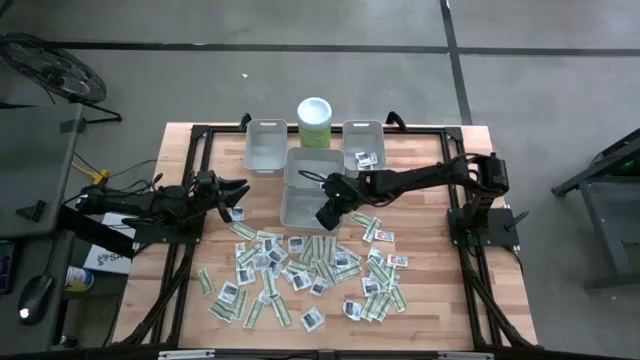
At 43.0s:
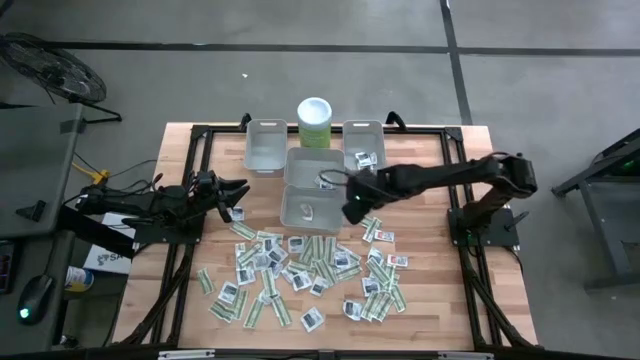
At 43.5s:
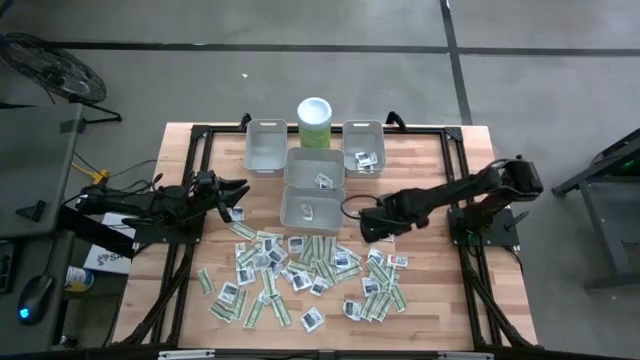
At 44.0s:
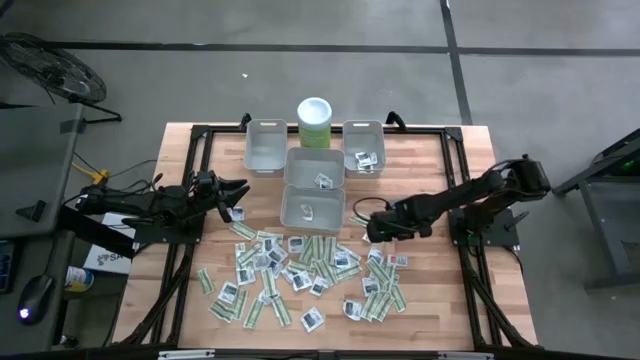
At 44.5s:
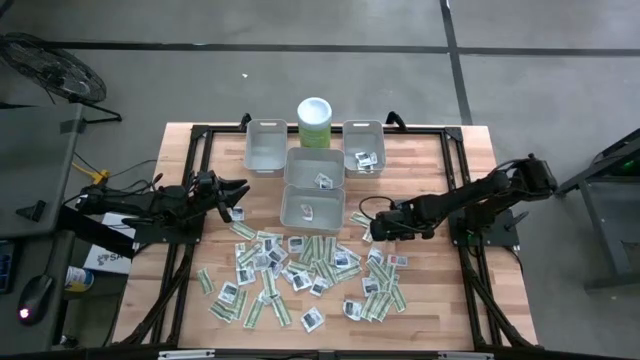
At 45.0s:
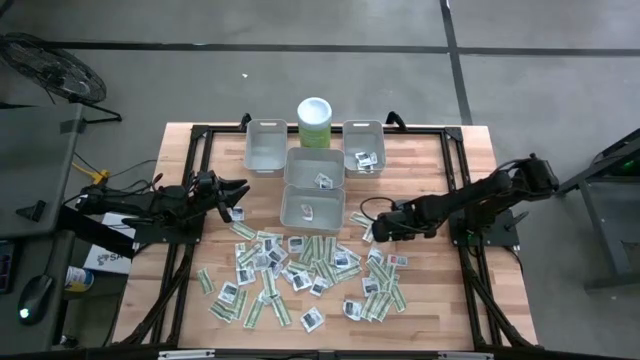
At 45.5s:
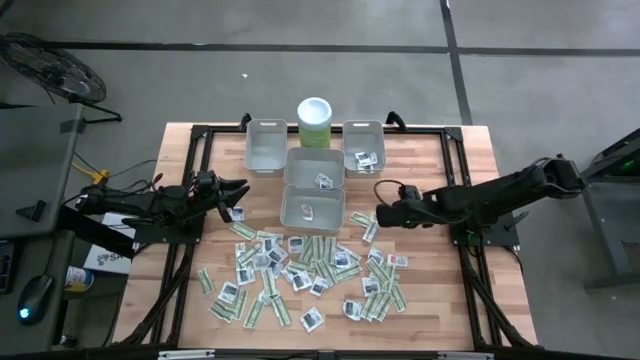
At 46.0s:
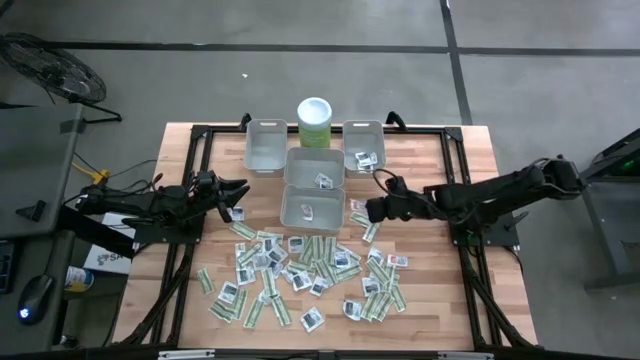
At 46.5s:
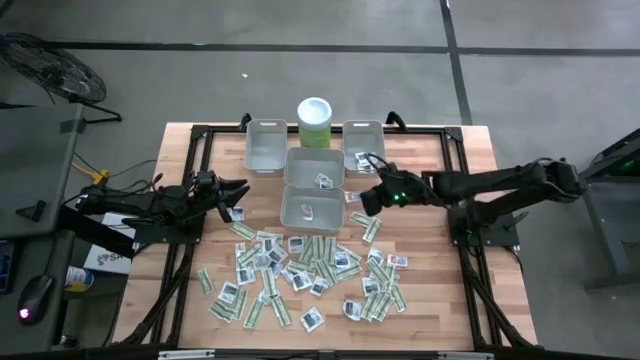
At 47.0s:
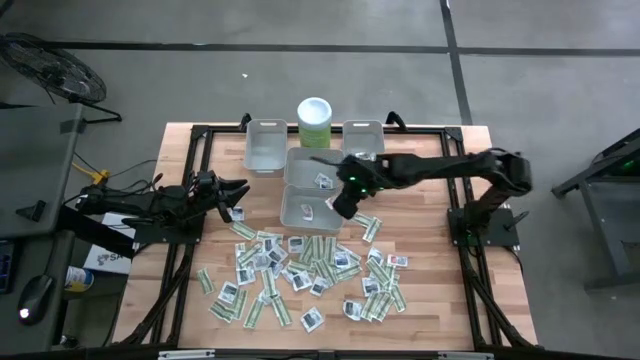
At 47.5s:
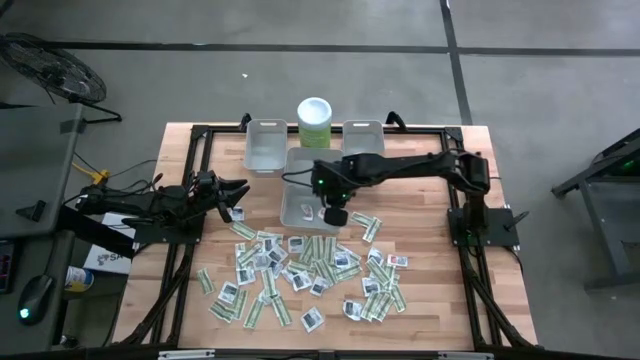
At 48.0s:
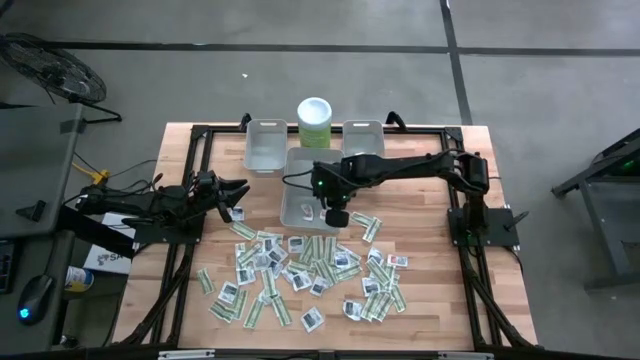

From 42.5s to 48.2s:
Task: Pick & Place First Aid Supplies
Put the ointment pack into the bottom center bin

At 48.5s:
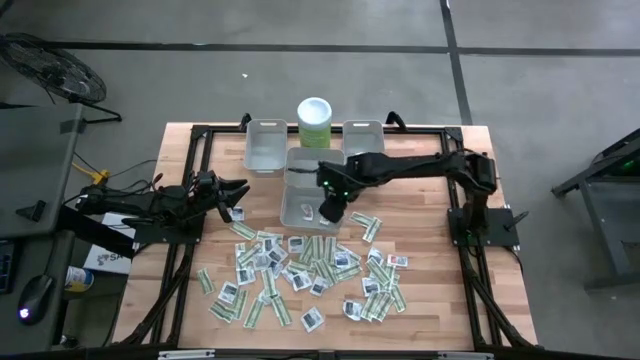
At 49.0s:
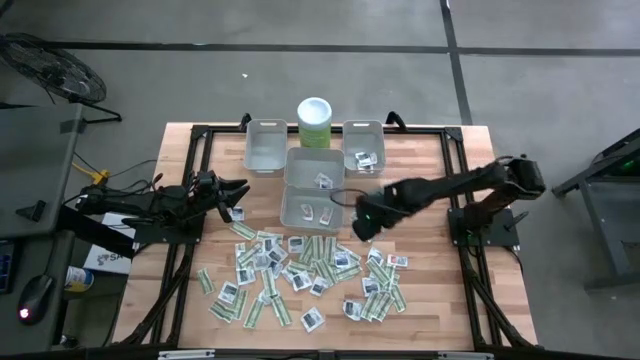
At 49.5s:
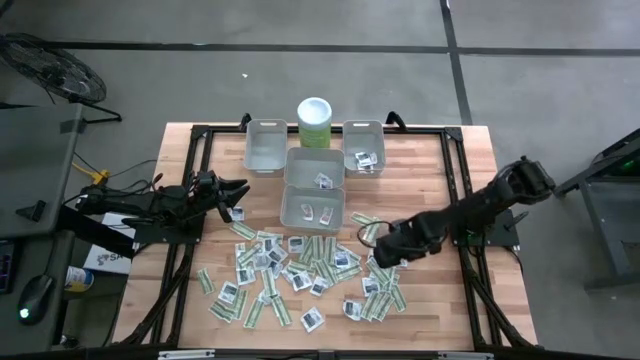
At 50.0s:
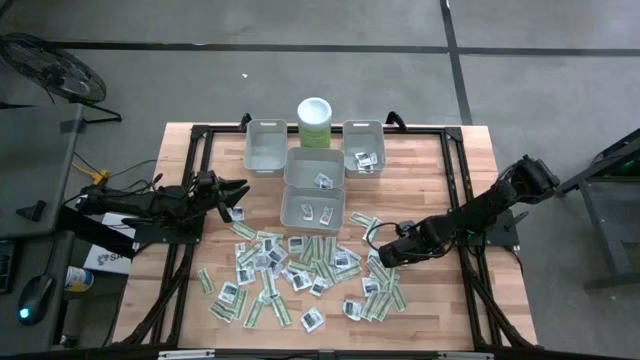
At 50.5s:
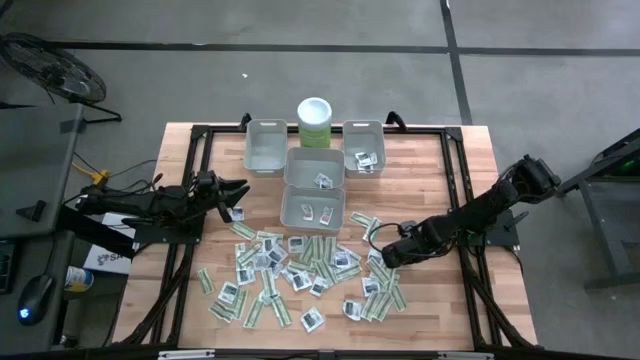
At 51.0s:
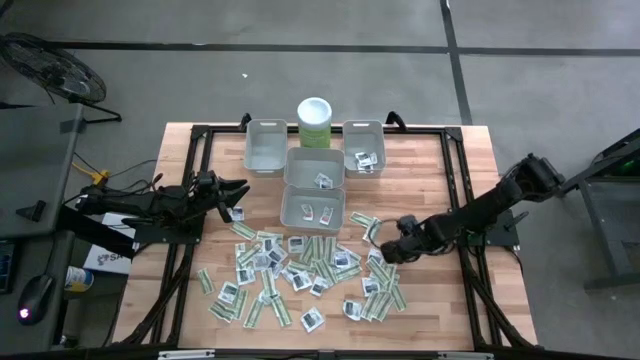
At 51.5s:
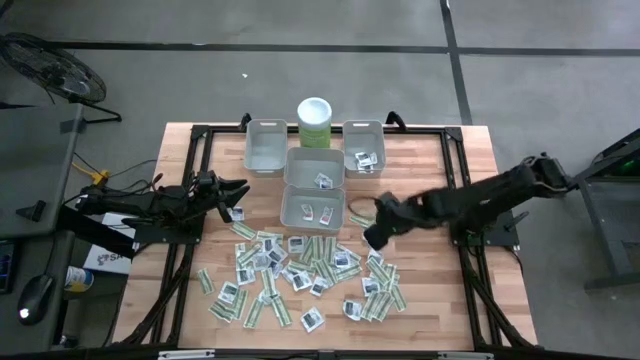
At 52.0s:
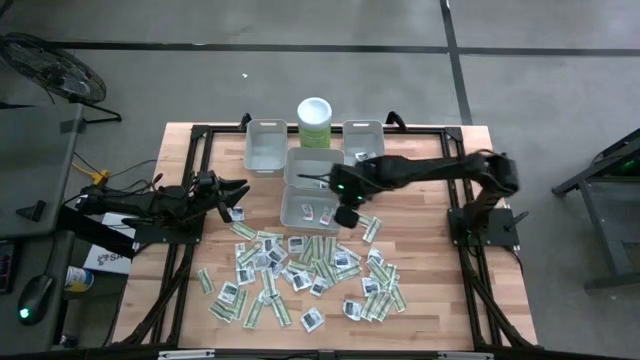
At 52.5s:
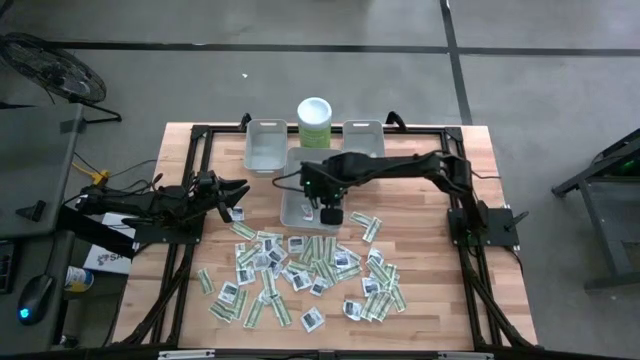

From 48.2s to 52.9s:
Put the top right ointment pack into the bottom center bin

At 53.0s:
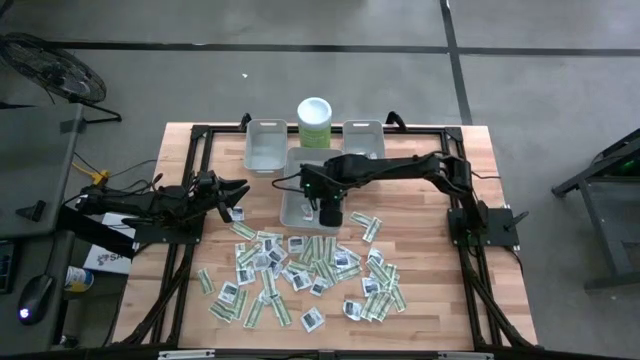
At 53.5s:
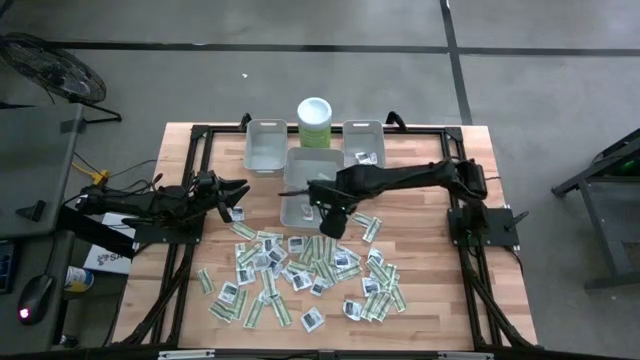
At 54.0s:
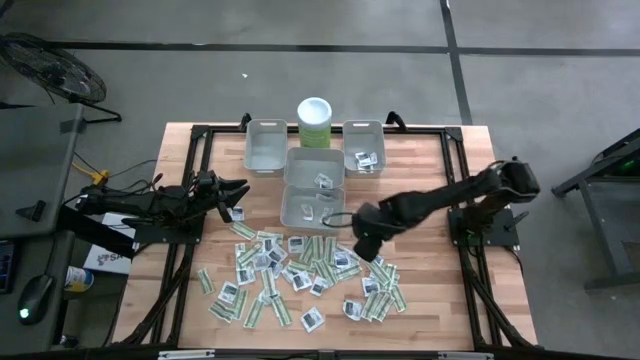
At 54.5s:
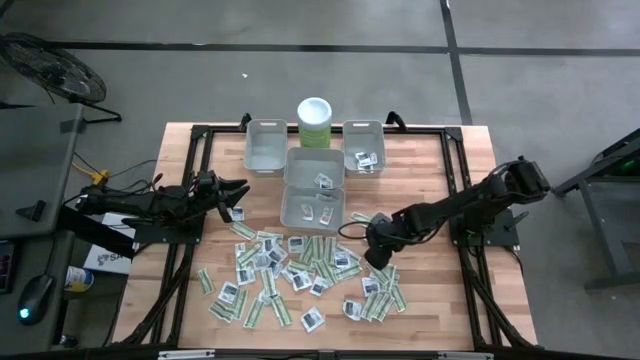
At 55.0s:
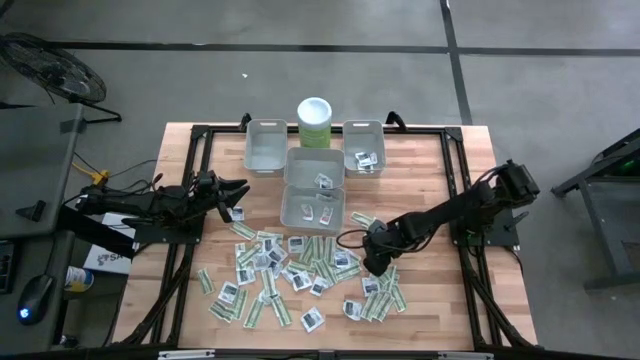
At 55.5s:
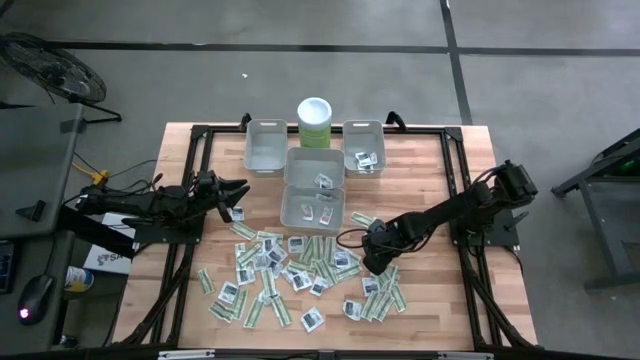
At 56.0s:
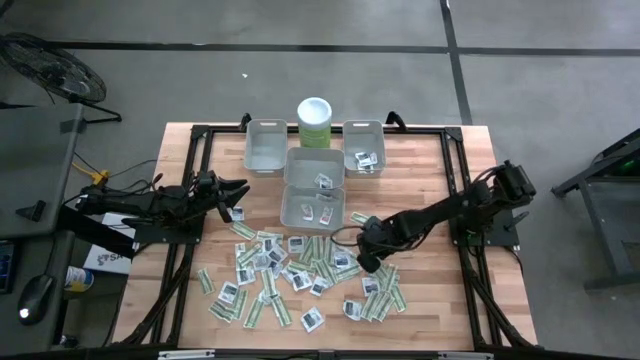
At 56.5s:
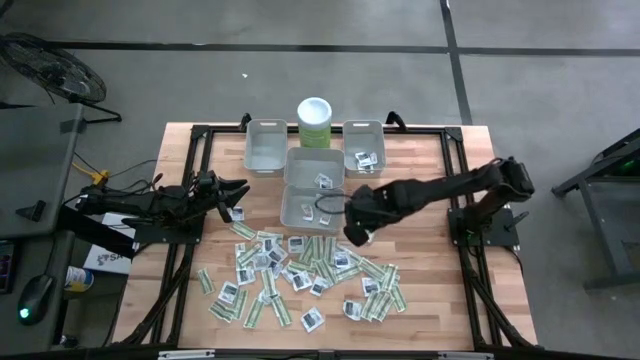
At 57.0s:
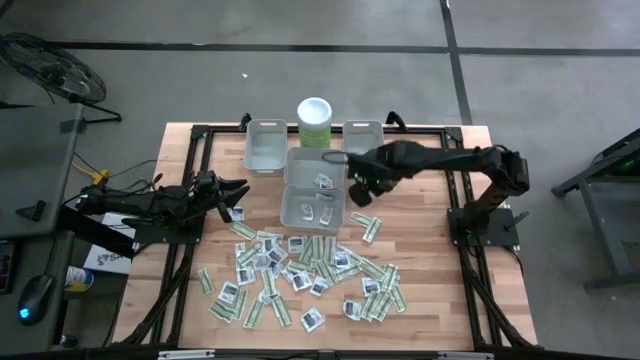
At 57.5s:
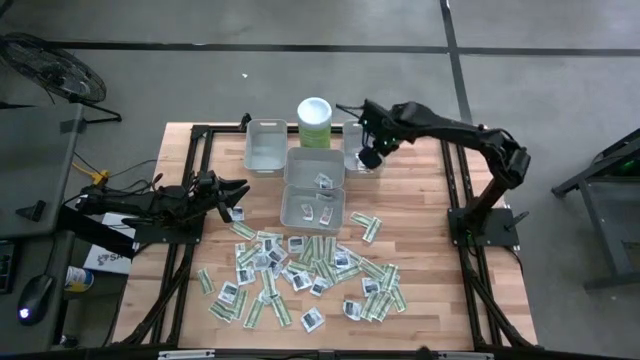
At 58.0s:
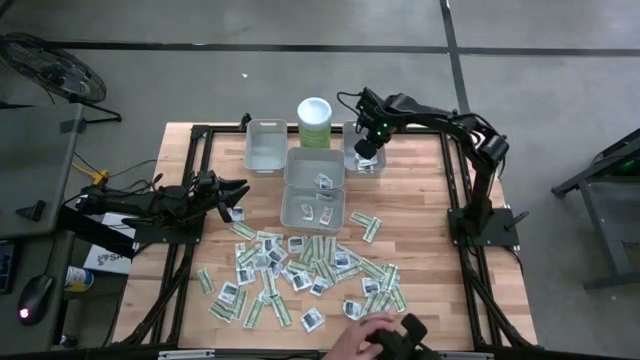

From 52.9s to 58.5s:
Put the towelette pack into the right bin

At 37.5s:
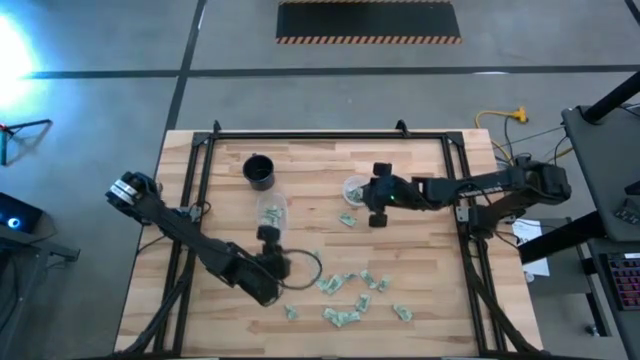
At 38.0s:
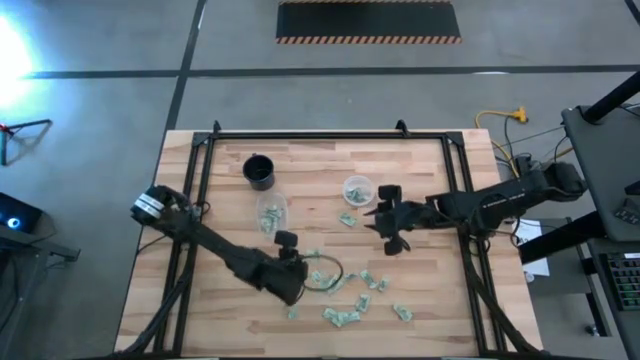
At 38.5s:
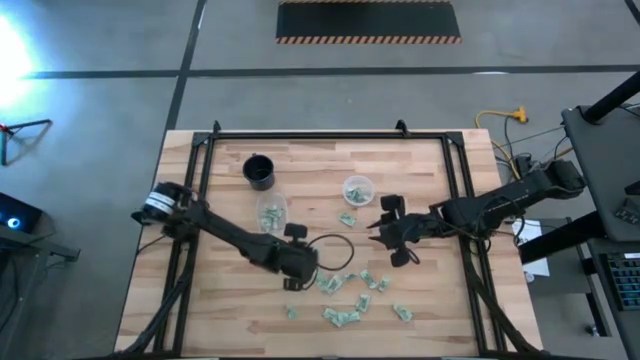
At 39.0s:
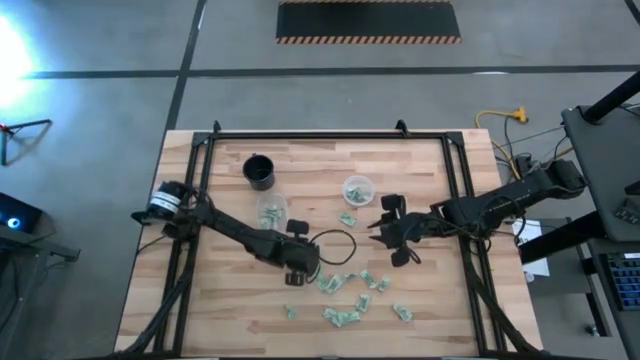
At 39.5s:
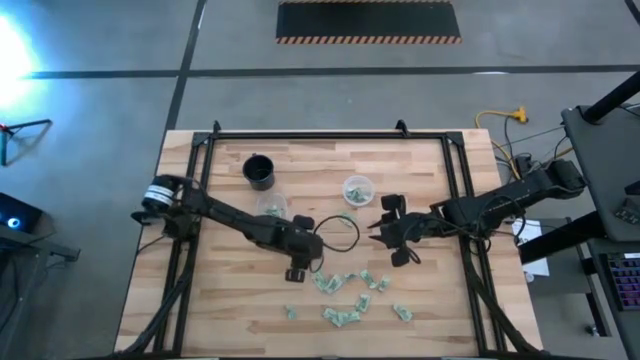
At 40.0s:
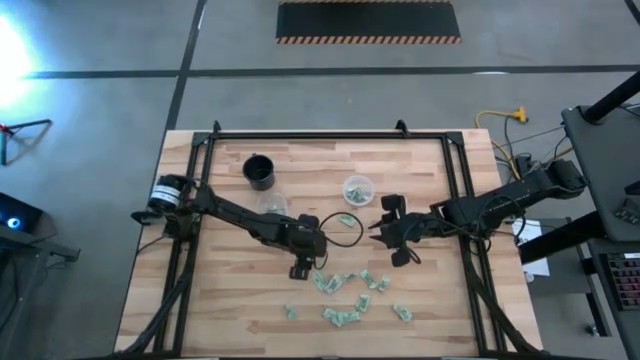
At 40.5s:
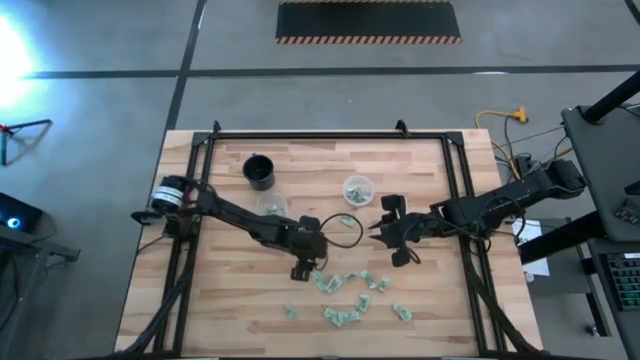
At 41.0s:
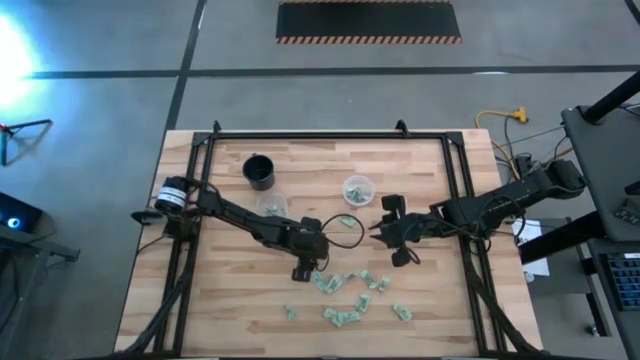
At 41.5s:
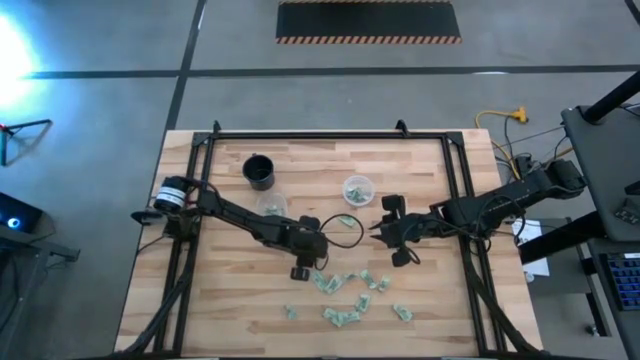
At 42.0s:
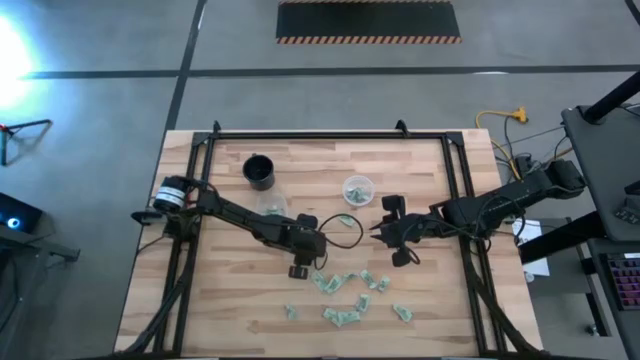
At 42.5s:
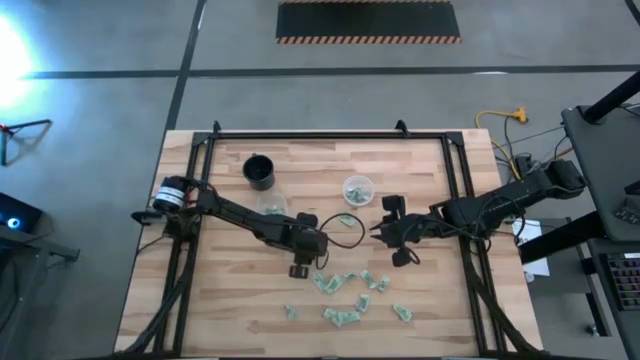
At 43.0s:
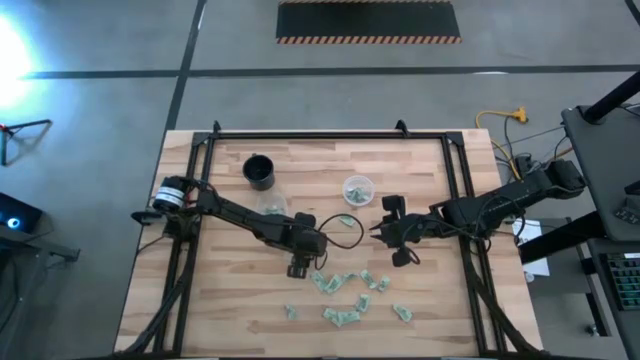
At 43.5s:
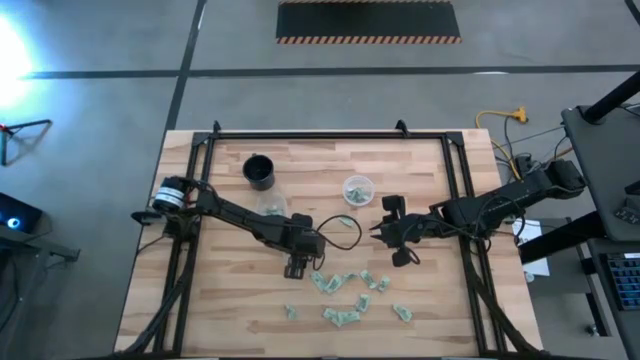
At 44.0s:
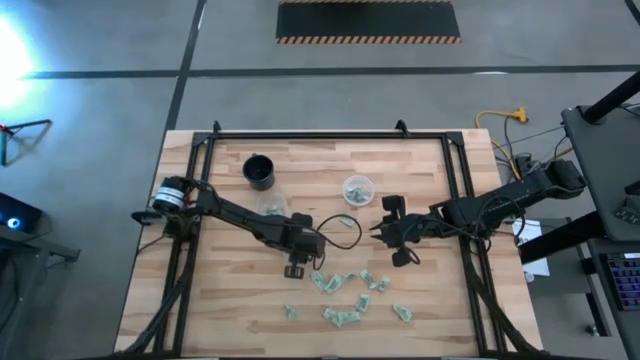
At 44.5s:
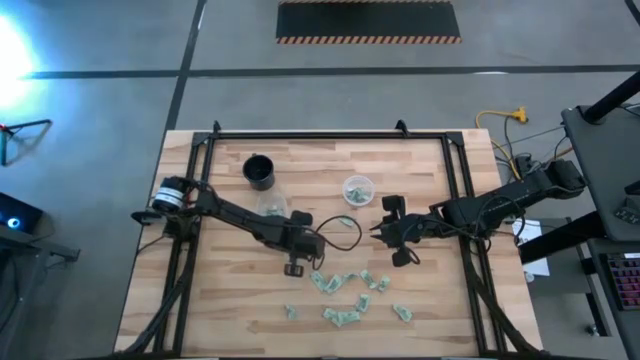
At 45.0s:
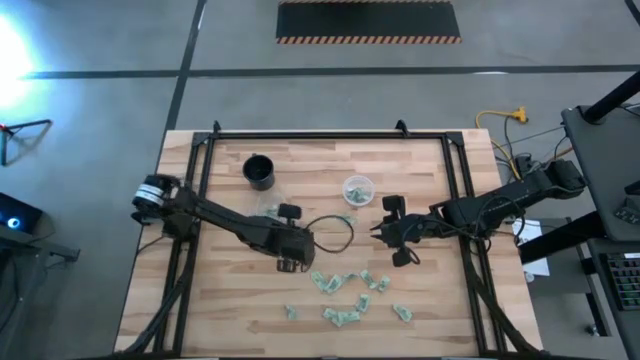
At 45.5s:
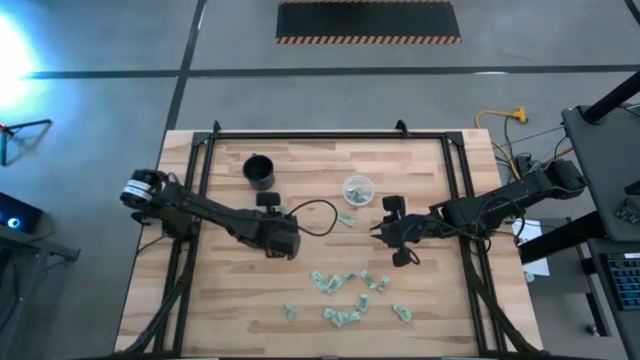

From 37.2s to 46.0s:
Task: Pick and place items into bin
Put the stevia packet into the left transparent bin
